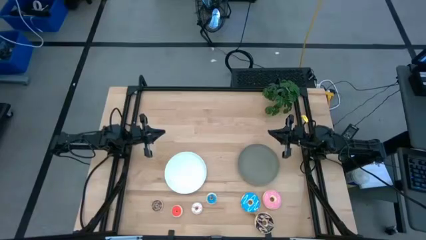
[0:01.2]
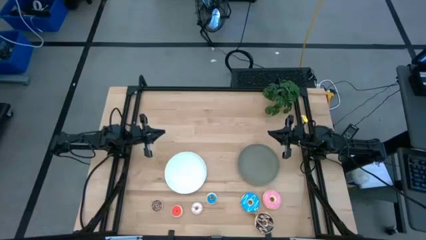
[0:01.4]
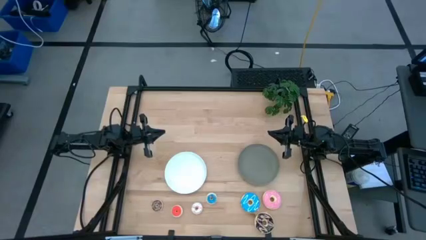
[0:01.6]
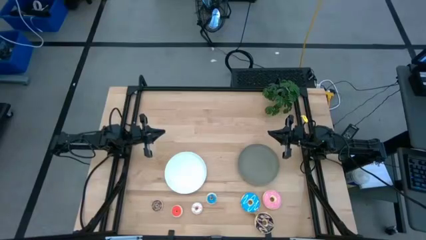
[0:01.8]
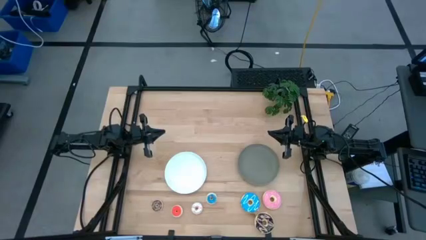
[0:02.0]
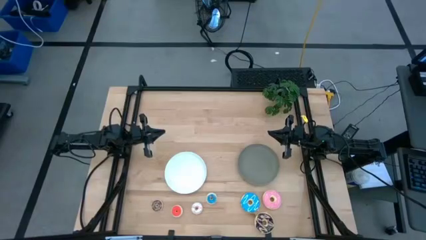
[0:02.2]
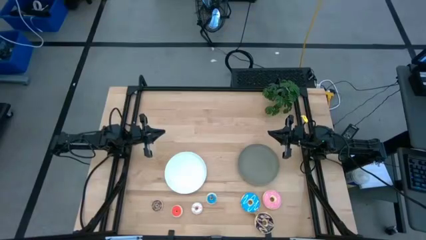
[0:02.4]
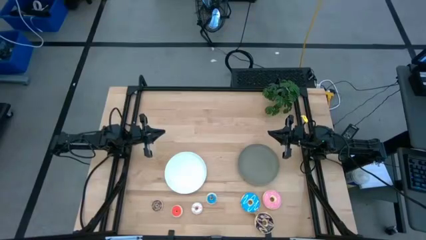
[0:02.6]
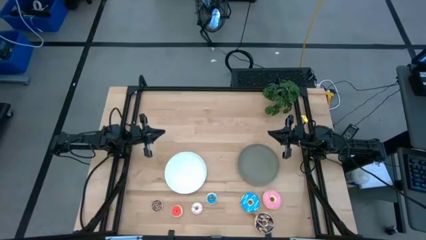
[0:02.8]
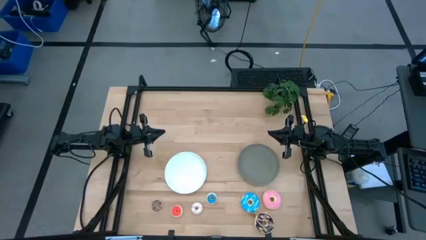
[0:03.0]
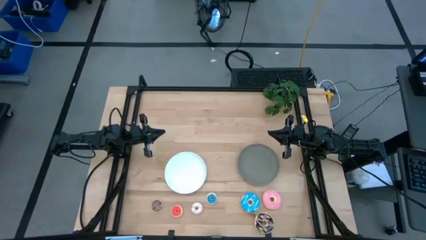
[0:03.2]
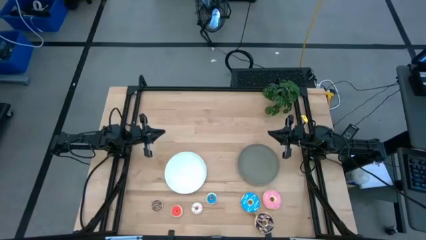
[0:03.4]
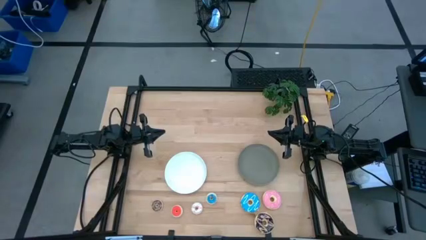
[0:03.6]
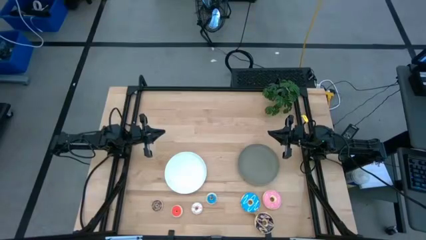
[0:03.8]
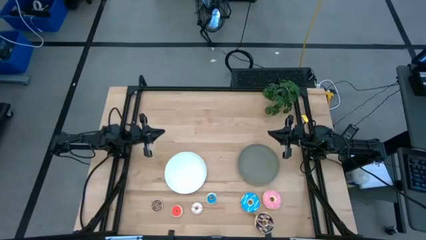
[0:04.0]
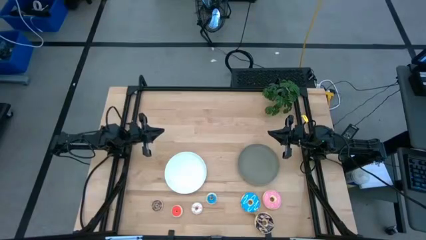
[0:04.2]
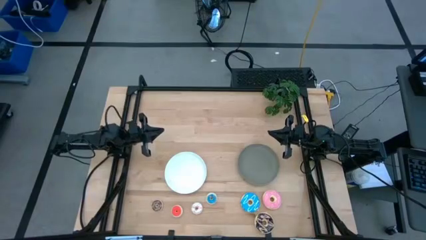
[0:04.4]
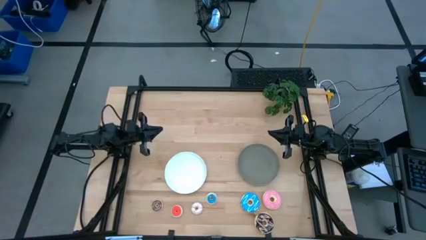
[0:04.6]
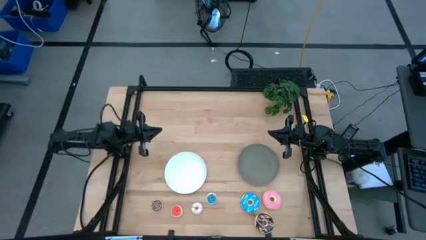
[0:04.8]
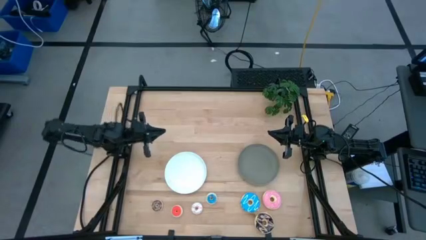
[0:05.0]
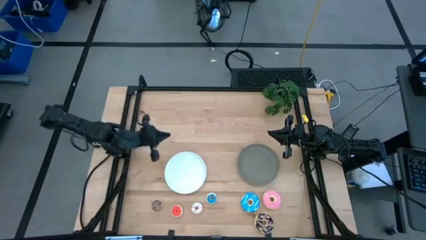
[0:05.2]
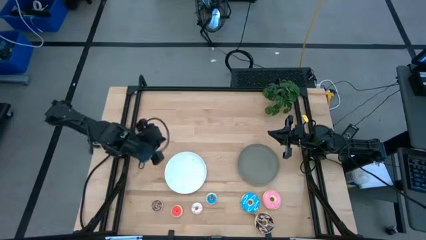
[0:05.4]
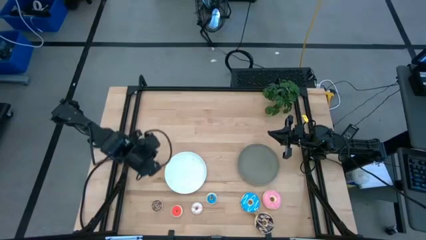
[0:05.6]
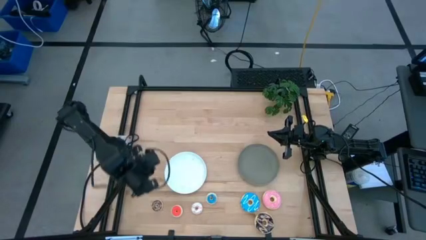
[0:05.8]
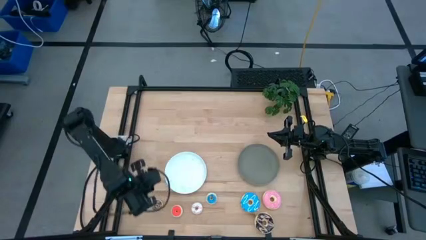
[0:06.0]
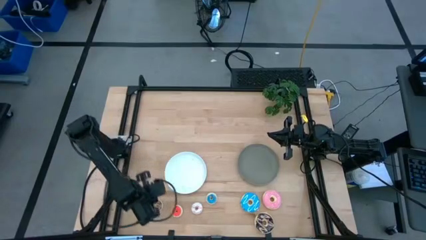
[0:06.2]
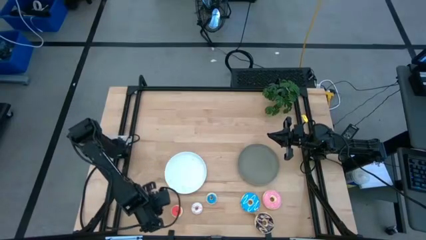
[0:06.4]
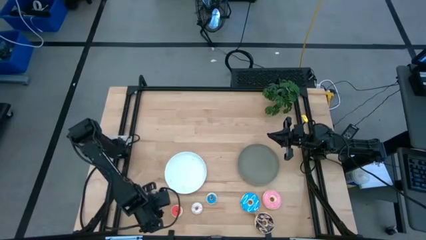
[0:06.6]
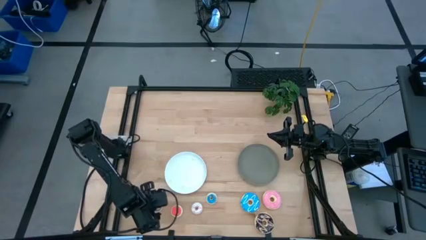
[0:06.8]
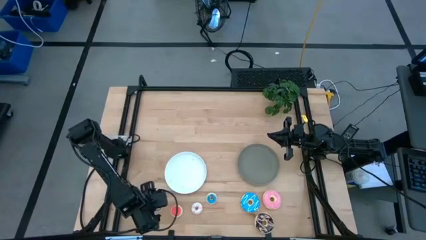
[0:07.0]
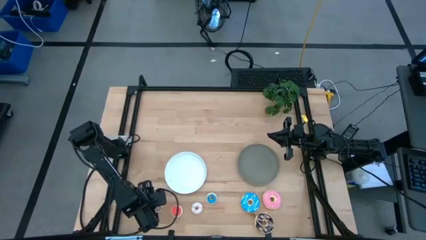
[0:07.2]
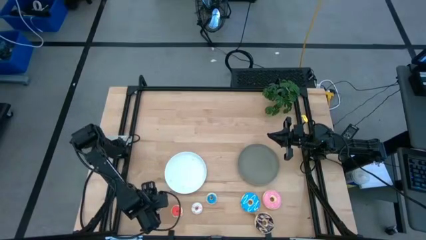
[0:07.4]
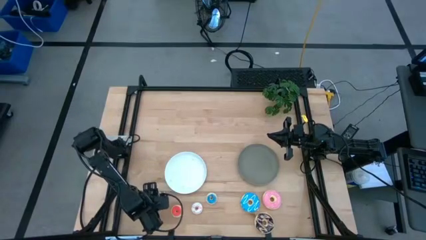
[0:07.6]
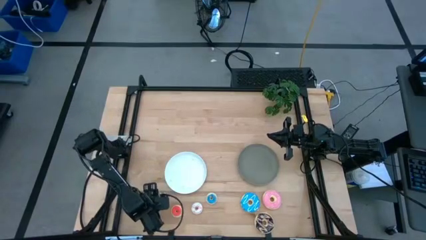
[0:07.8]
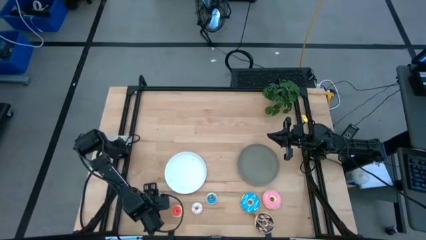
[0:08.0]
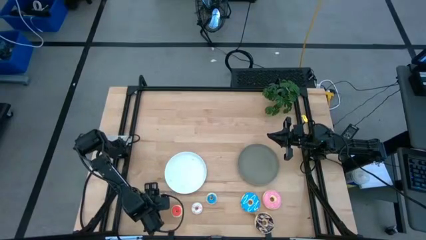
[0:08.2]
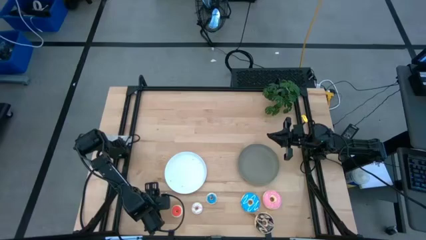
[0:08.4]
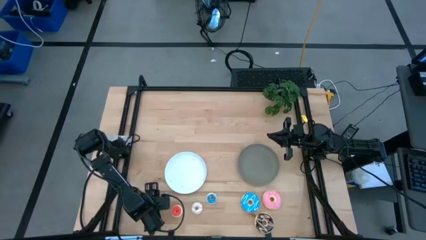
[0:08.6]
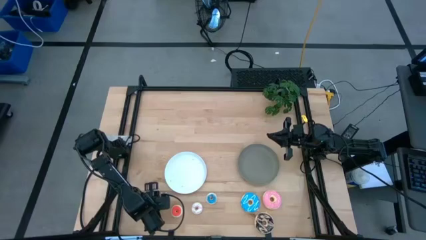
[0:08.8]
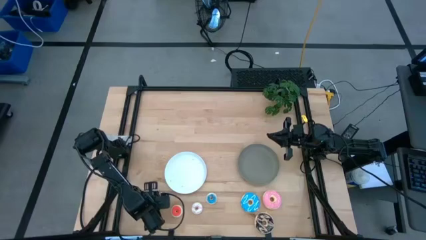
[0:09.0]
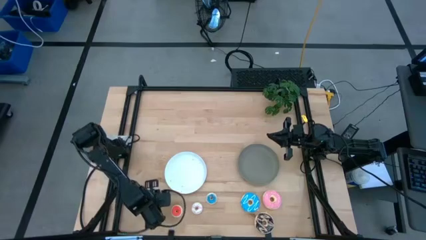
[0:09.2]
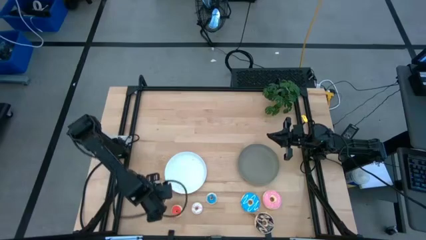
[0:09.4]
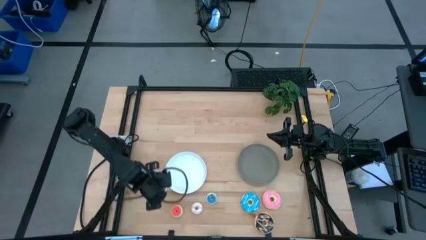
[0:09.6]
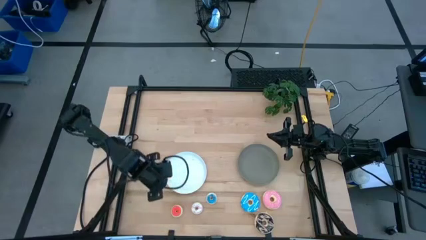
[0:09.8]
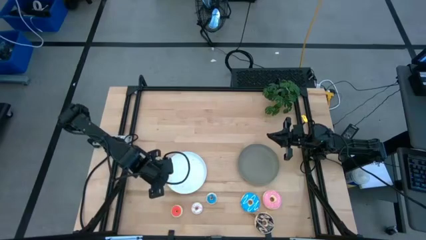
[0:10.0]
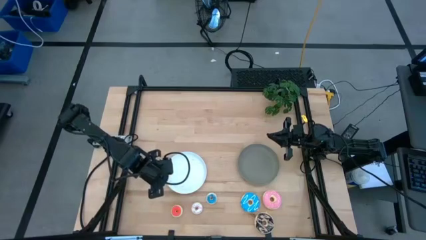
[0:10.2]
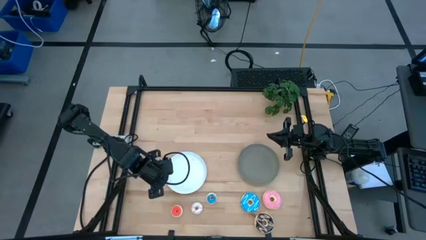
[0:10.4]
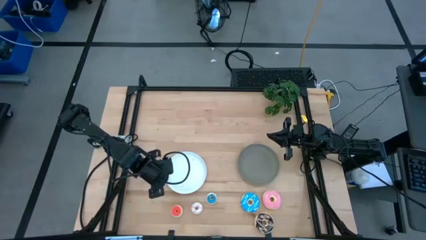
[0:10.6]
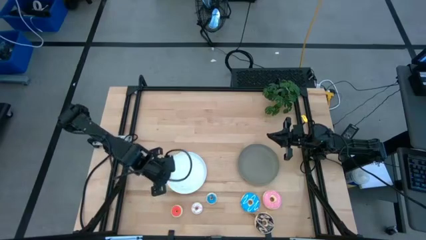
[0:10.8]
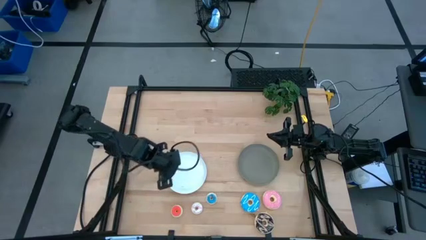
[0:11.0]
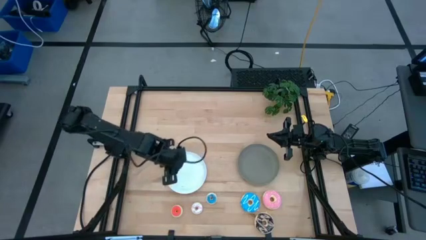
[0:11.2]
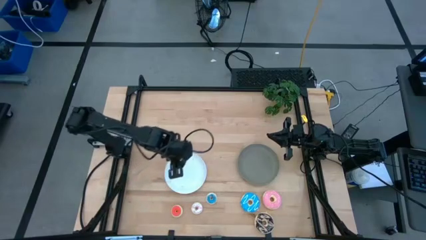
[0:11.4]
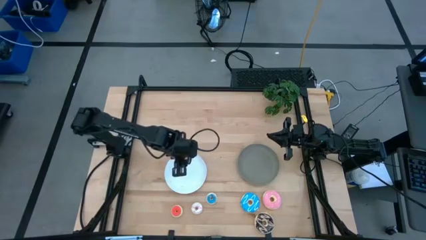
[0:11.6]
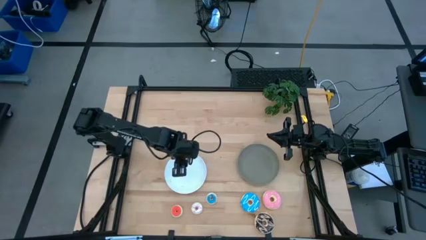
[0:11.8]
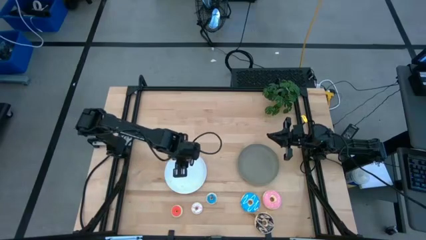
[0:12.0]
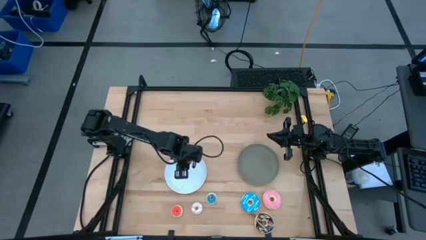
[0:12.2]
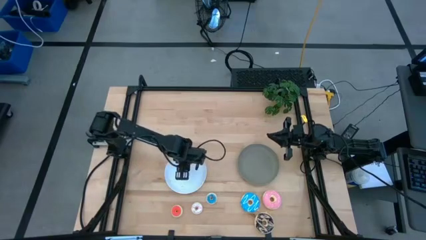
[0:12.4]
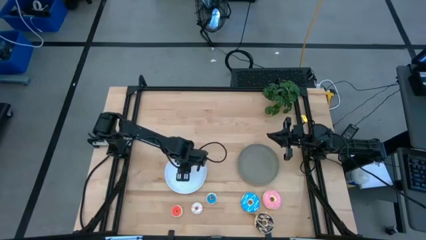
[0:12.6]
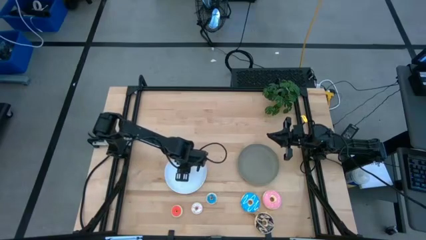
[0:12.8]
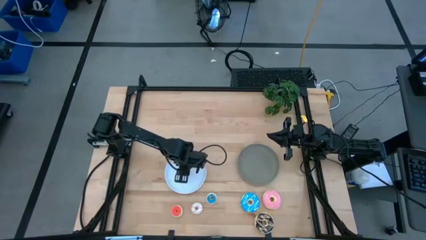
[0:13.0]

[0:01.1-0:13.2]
Task: Pick & Place donuts
Put the small brown donut on the white plate
